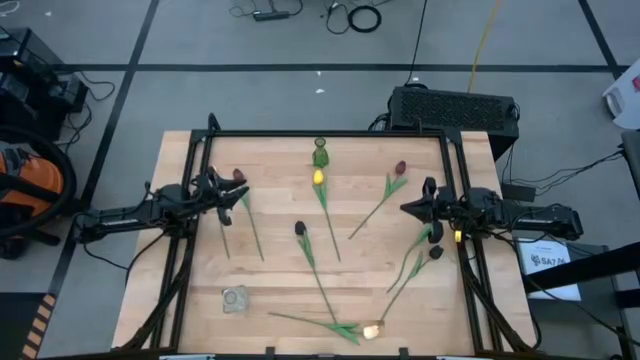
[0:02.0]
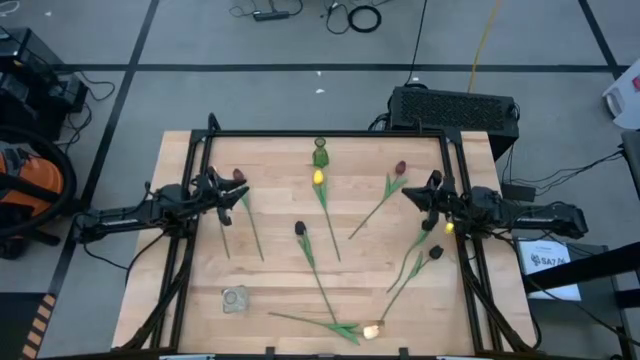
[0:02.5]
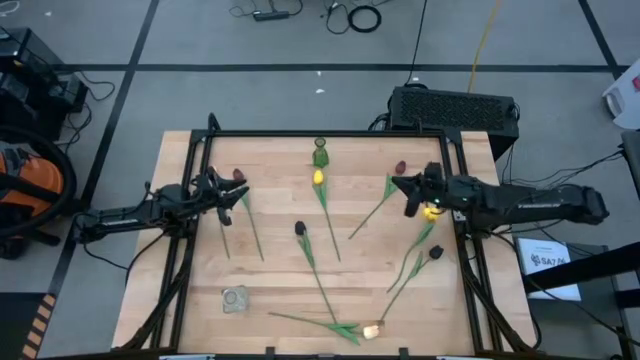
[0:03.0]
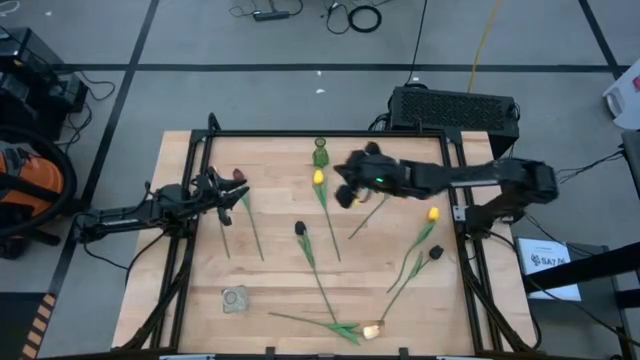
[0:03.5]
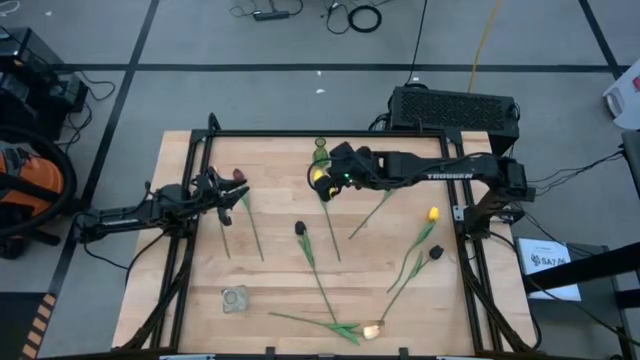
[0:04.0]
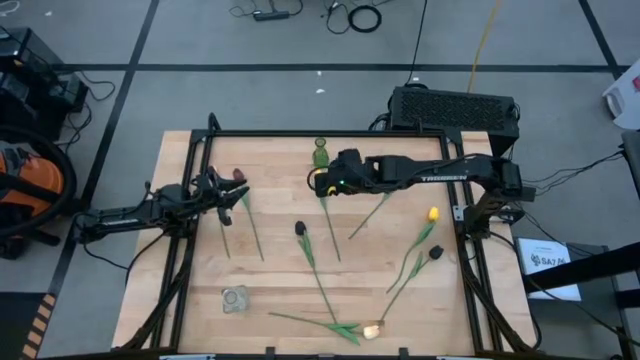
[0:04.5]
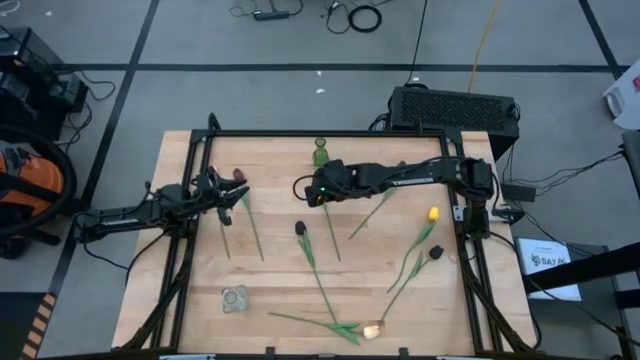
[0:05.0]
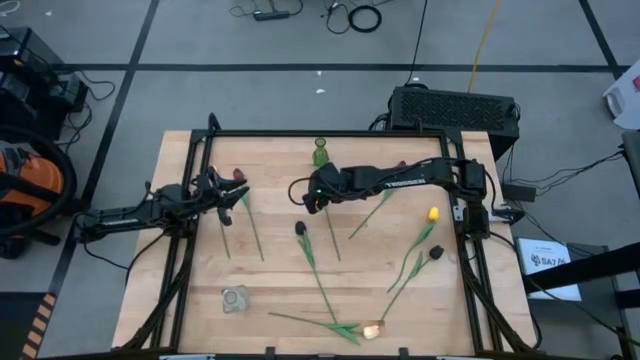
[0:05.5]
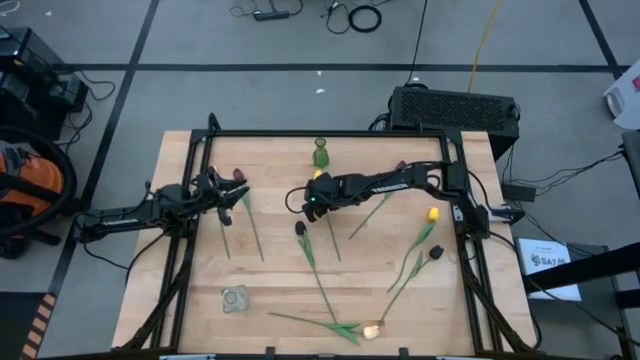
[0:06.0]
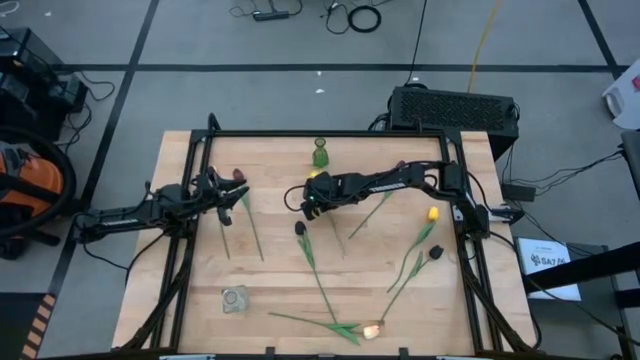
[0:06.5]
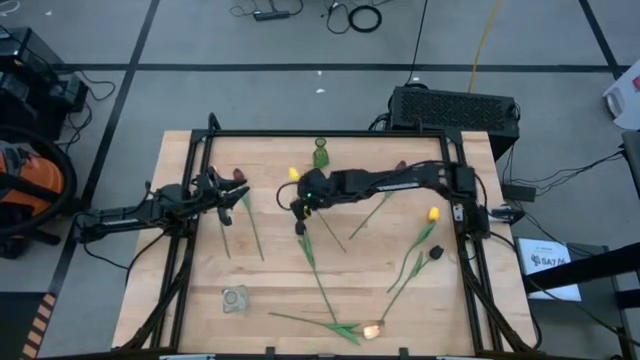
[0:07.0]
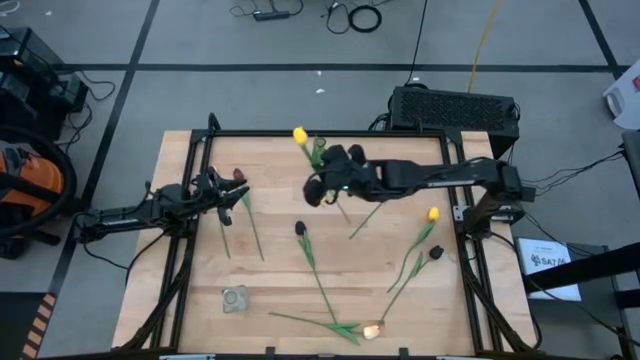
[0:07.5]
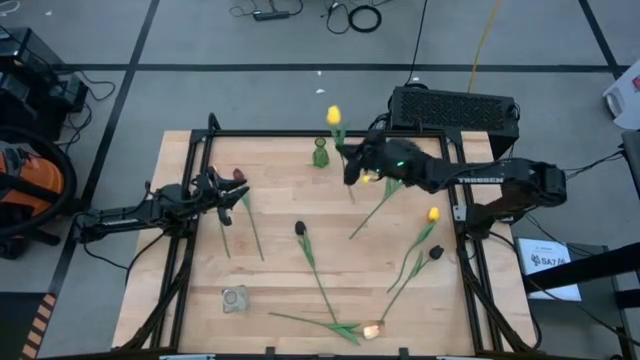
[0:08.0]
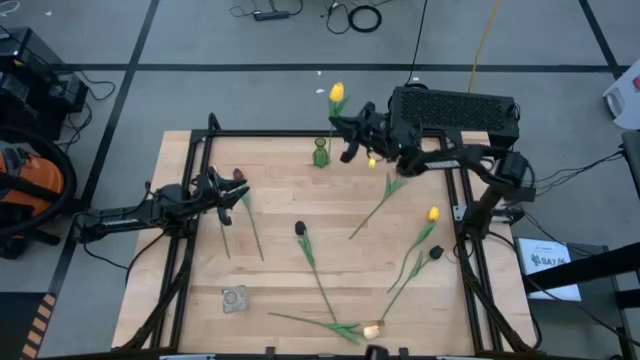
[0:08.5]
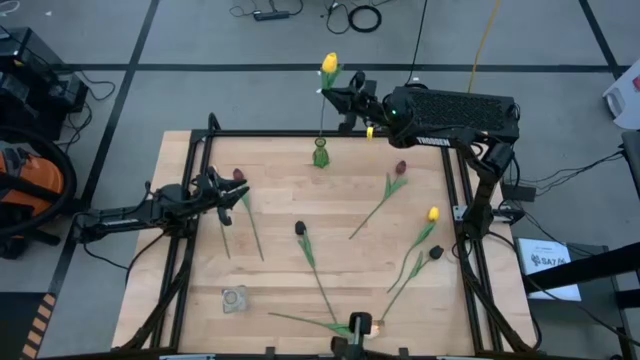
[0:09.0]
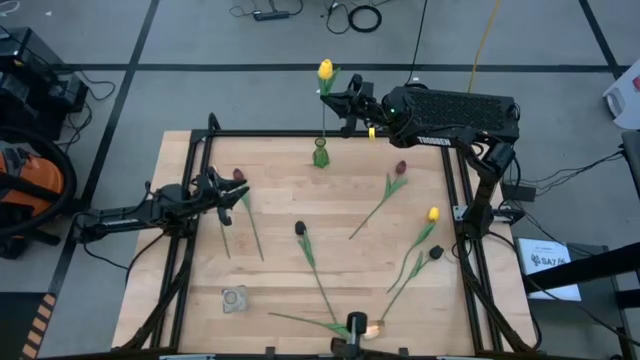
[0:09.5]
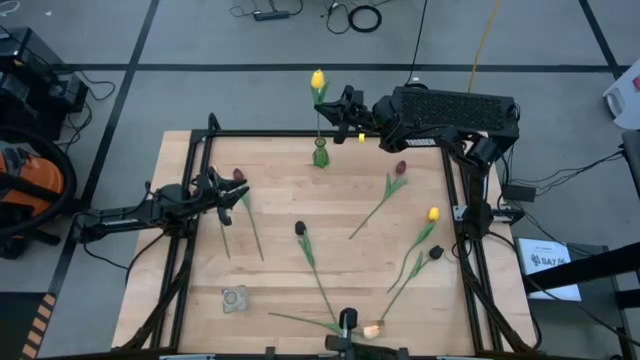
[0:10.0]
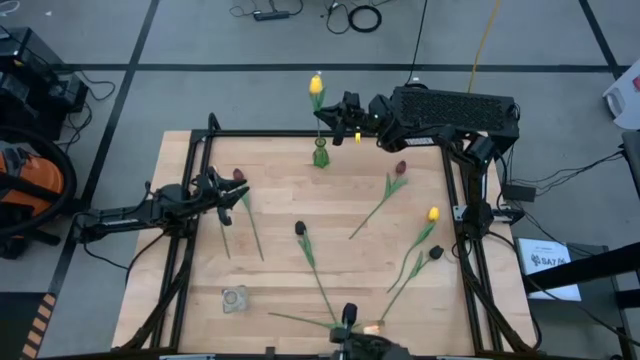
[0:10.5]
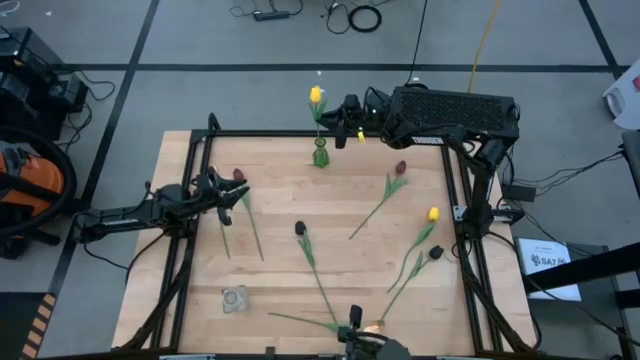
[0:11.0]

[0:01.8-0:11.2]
Task: Sort flowers into vase by color
Put the left yellow flower into the green vase

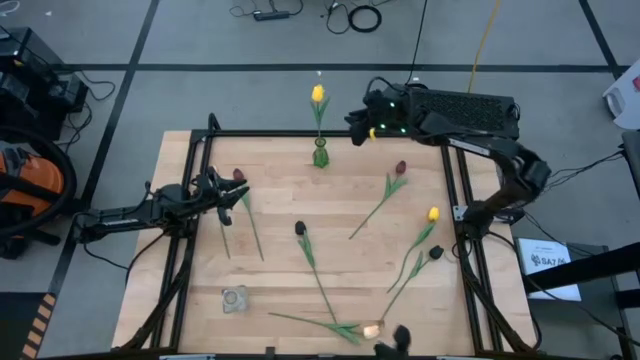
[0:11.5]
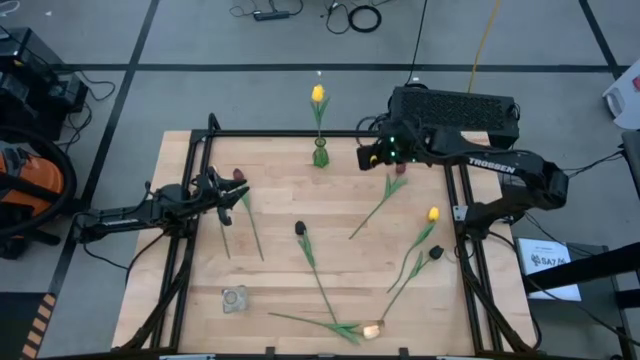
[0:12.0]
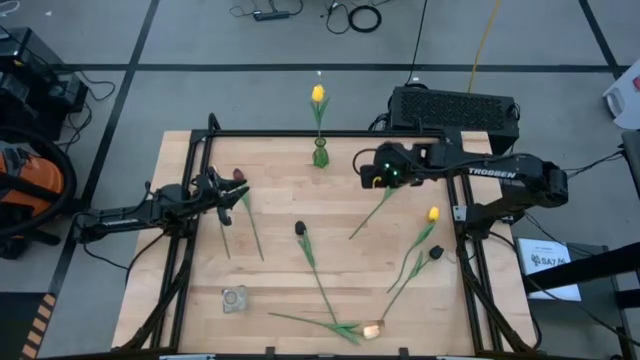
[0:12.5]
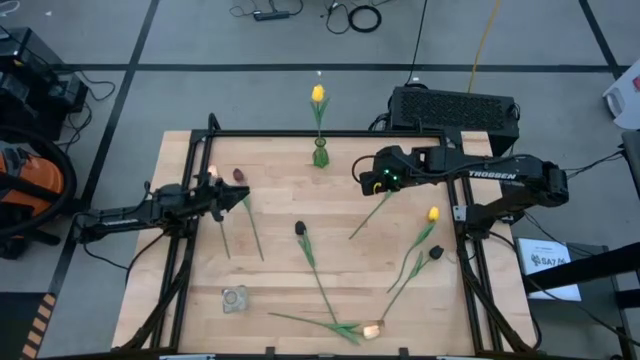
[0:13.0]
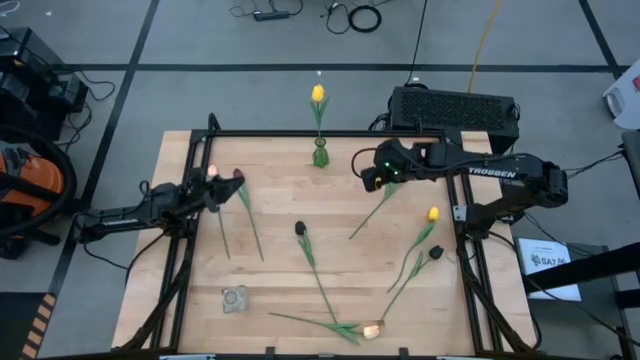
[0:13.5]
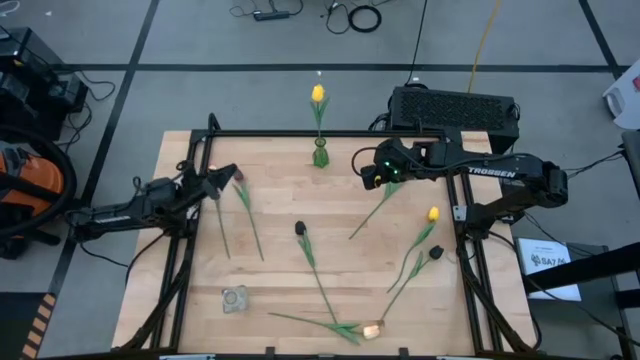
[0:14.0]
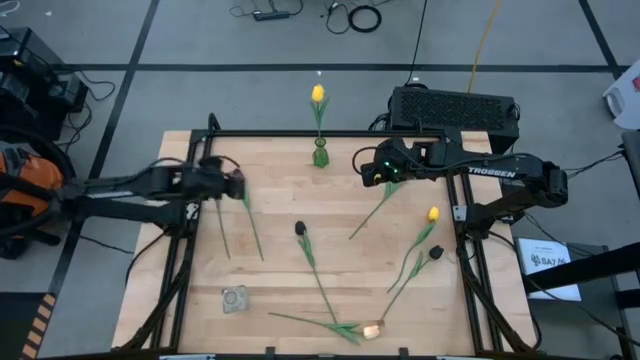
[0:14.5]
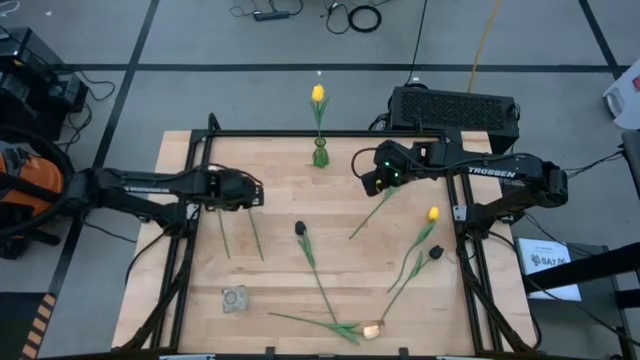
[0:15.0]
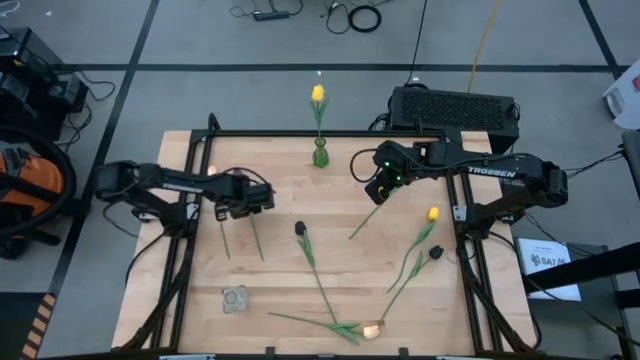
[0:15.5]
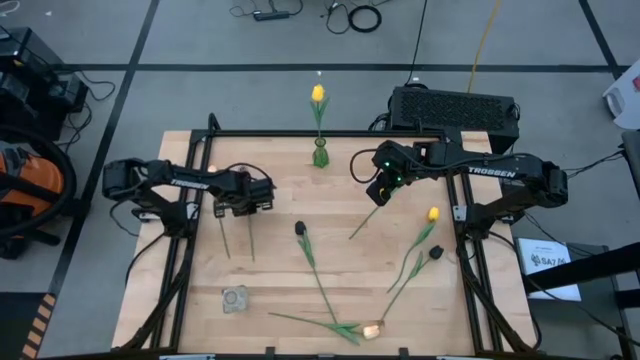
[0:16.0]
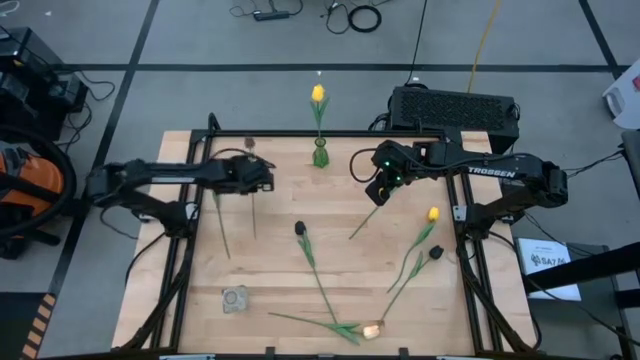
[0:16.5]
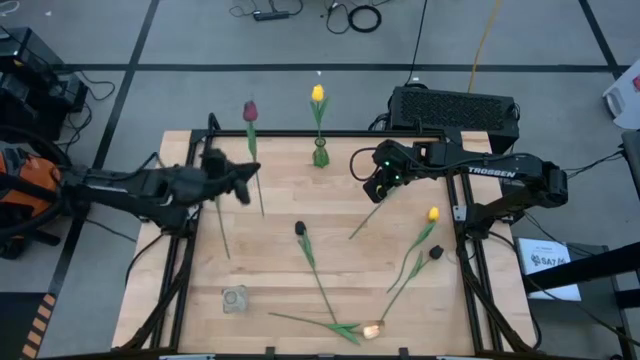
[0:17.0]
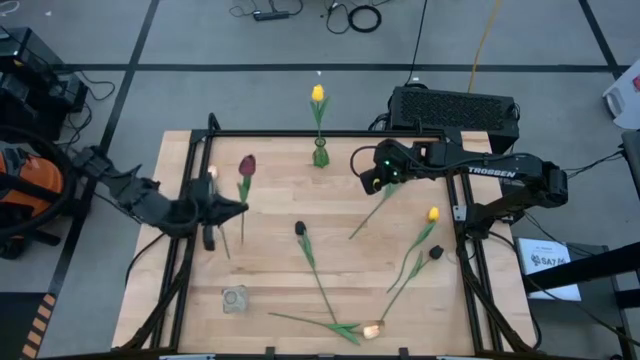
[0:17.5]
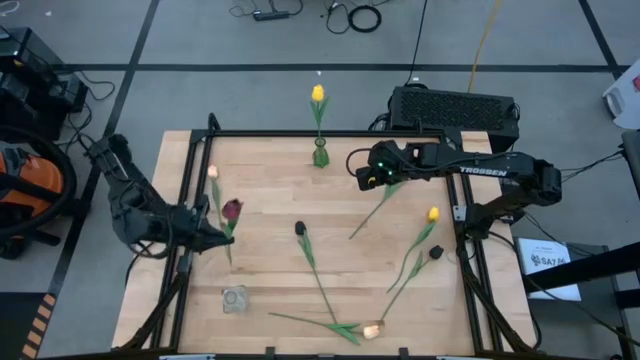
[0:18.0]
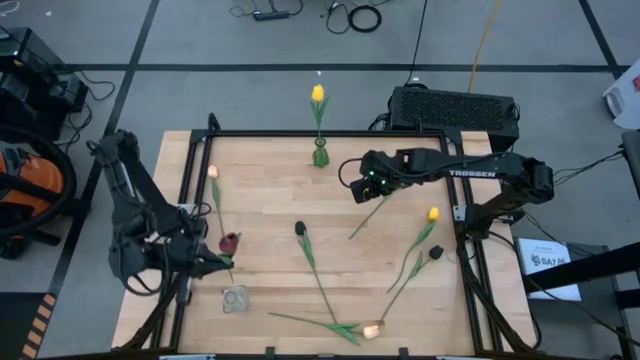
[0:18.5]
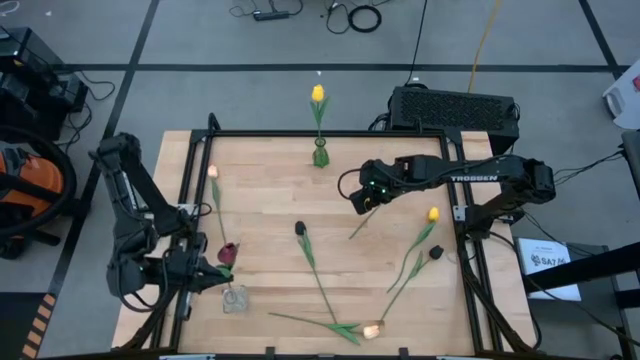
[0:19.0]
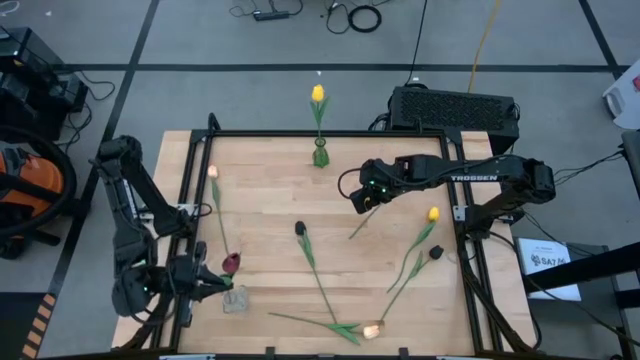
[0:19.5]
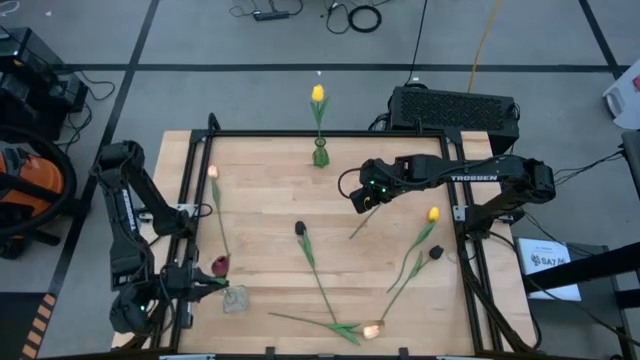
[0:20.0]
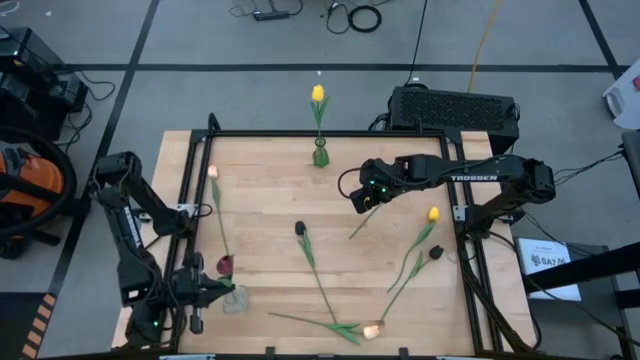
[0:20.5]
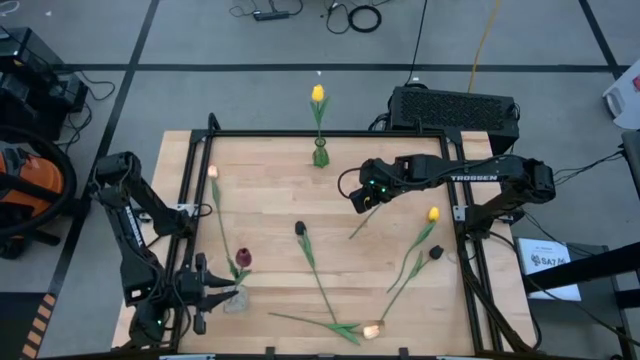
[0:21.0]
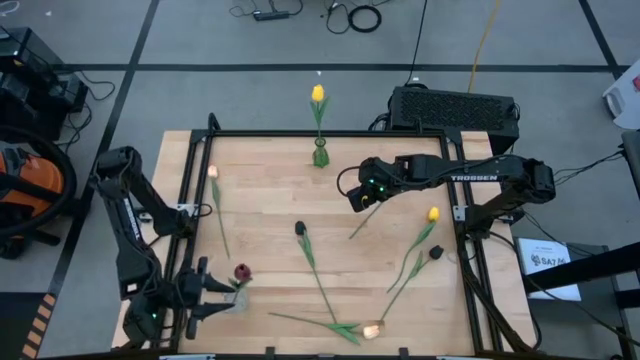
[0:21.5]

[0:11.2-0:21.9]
Put the left dark red flower into the transparent vase
